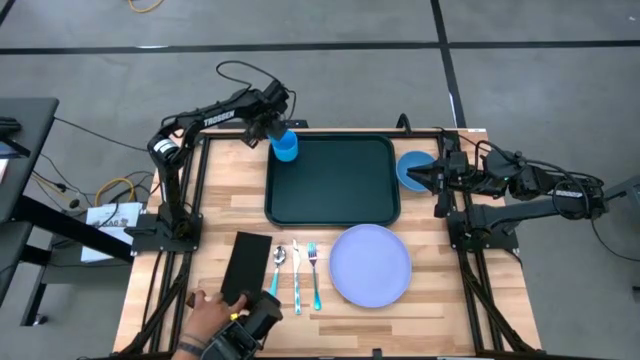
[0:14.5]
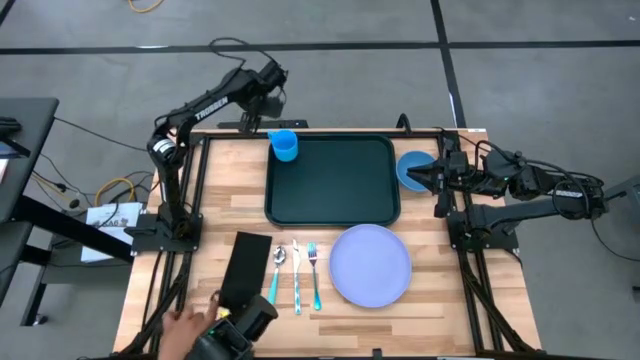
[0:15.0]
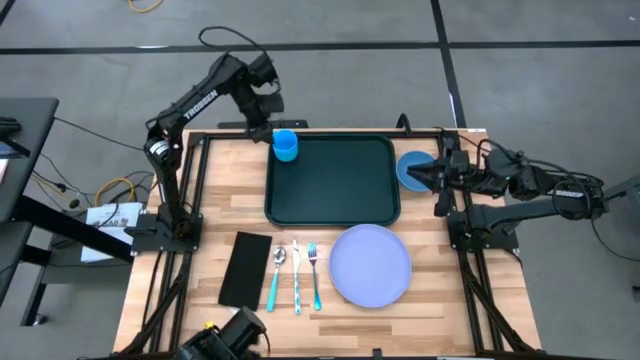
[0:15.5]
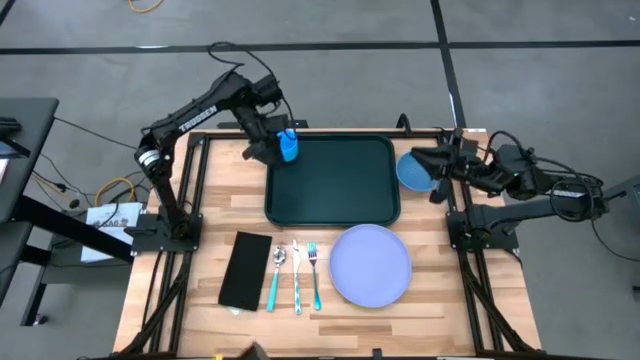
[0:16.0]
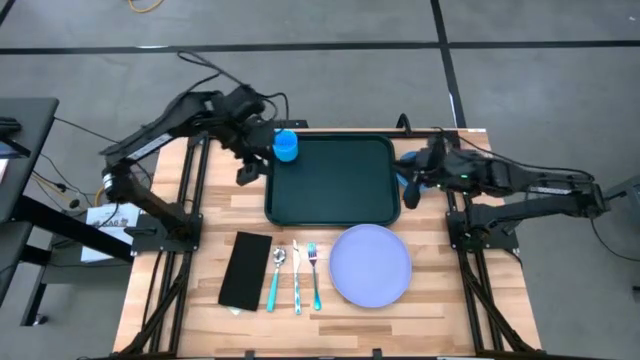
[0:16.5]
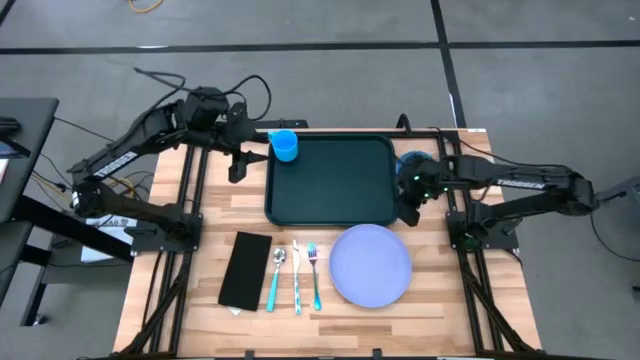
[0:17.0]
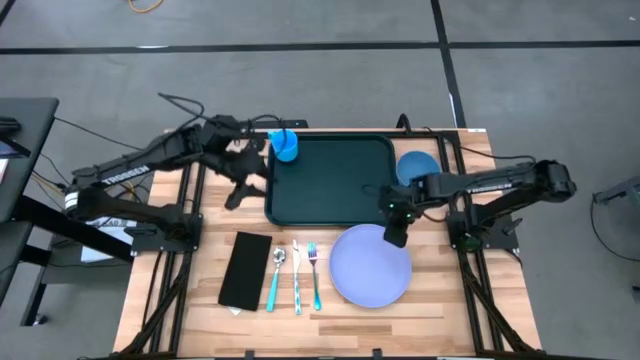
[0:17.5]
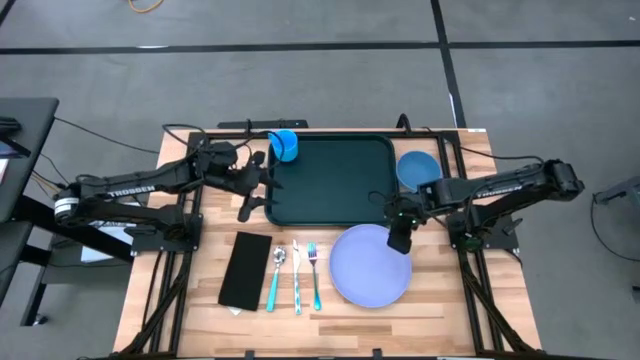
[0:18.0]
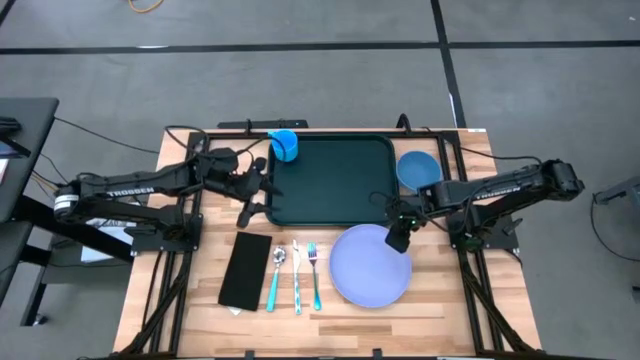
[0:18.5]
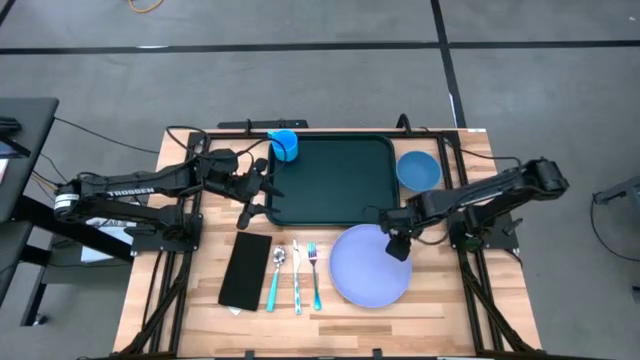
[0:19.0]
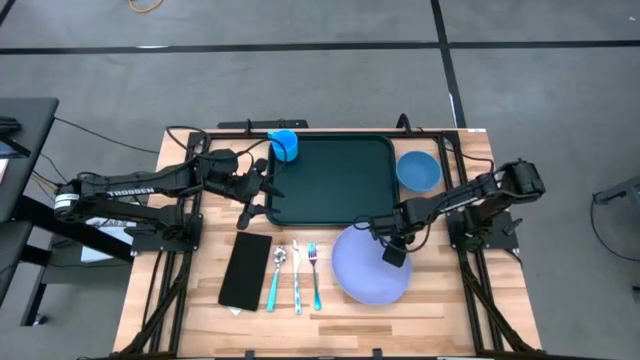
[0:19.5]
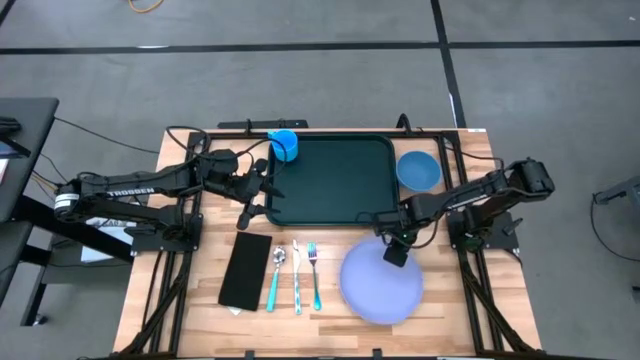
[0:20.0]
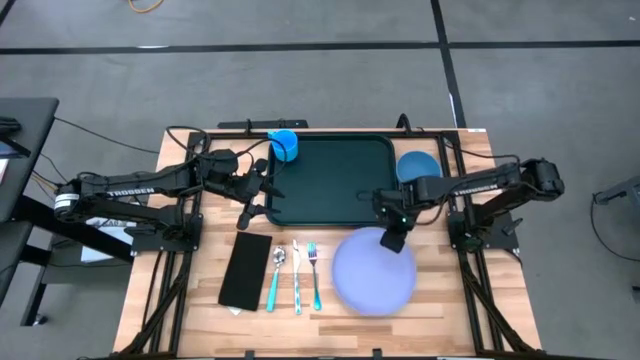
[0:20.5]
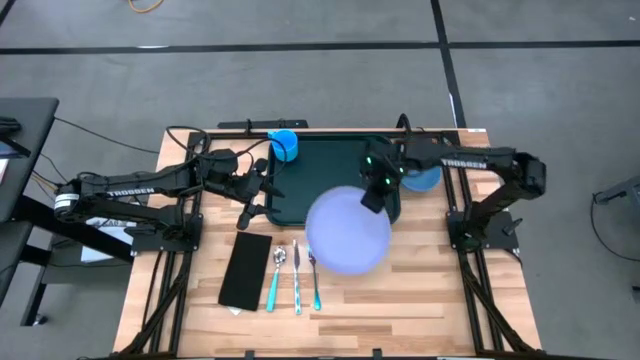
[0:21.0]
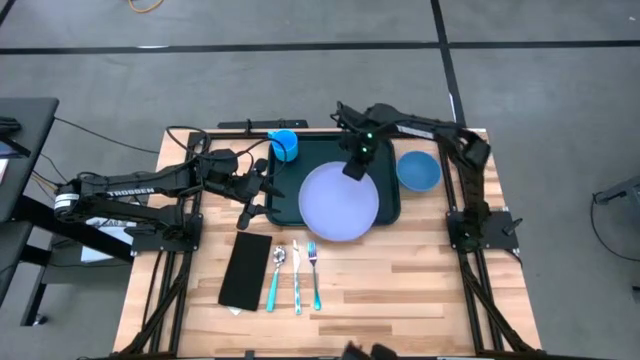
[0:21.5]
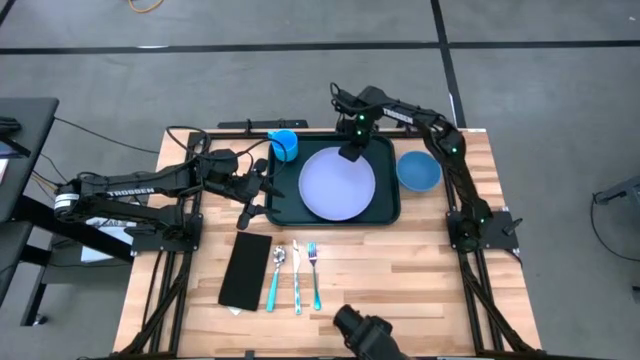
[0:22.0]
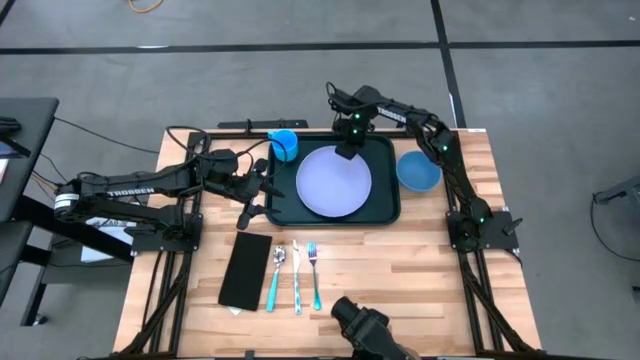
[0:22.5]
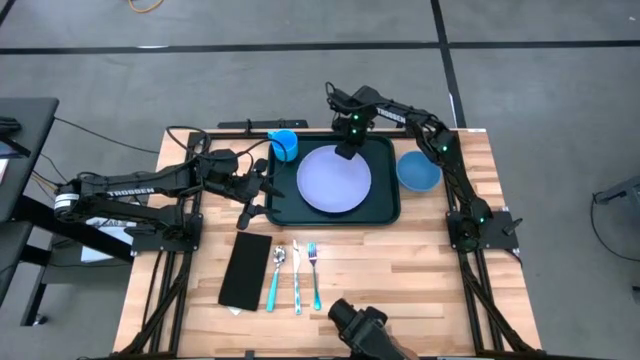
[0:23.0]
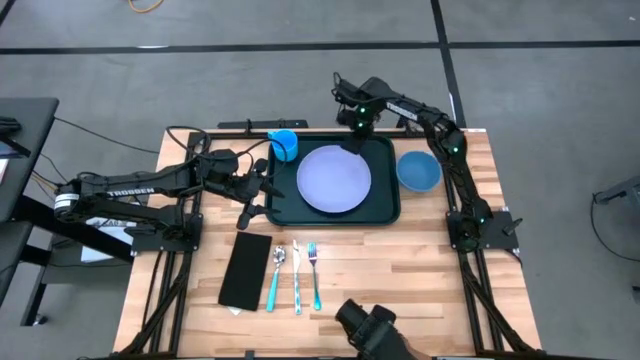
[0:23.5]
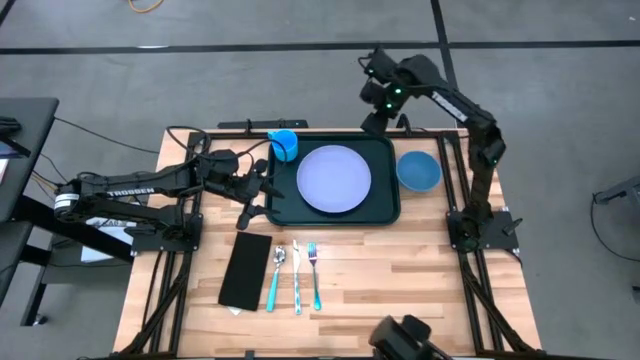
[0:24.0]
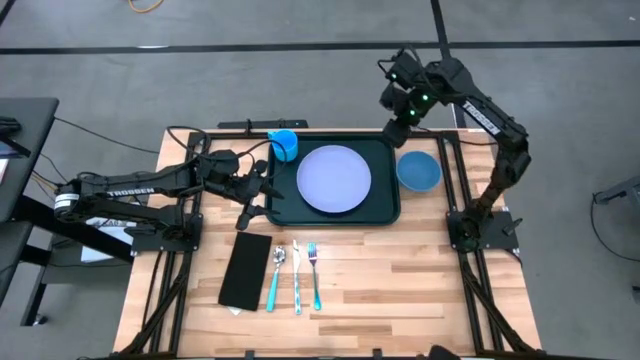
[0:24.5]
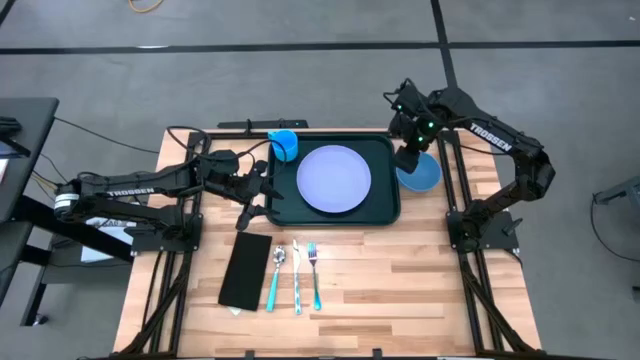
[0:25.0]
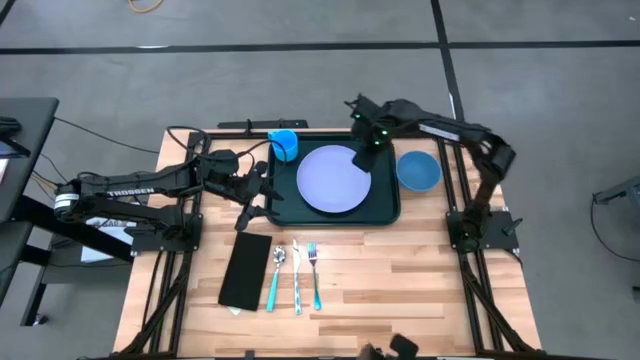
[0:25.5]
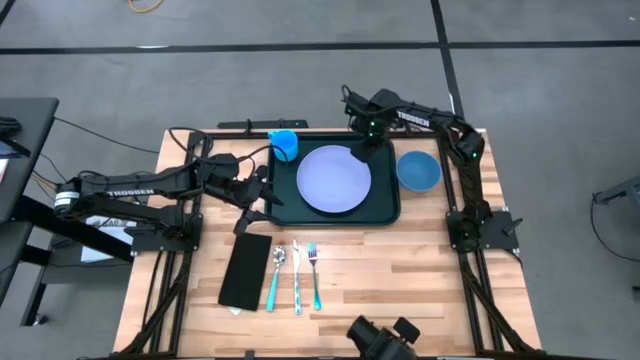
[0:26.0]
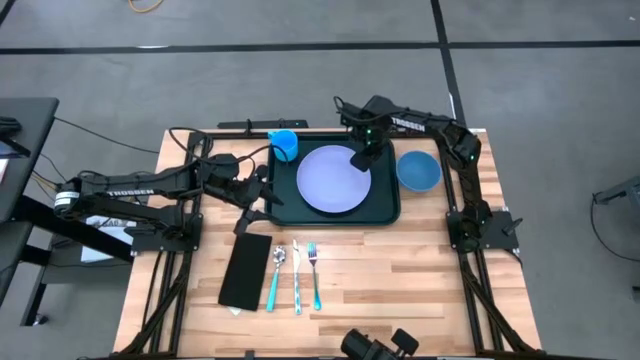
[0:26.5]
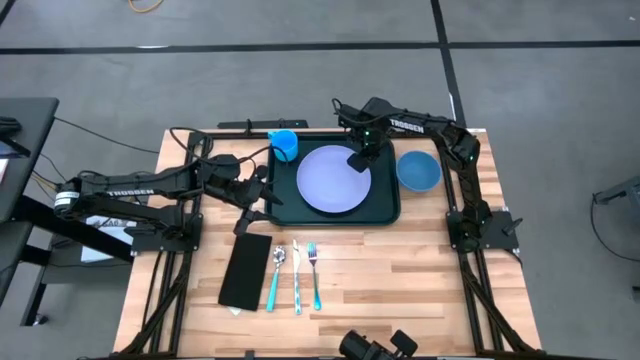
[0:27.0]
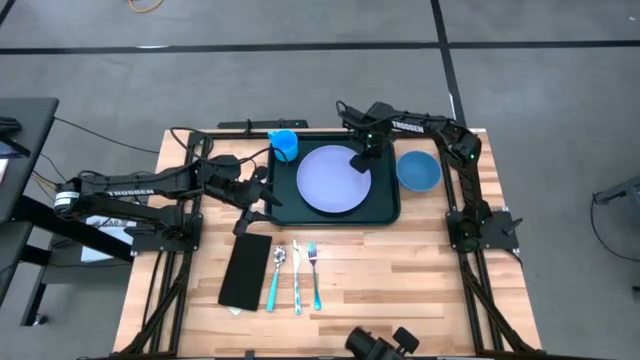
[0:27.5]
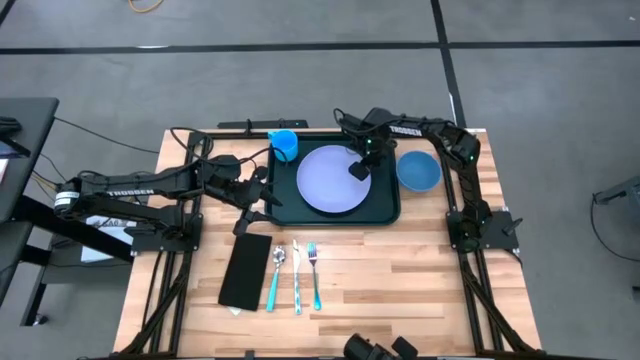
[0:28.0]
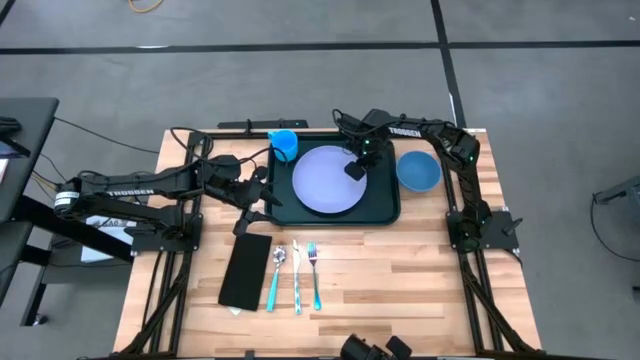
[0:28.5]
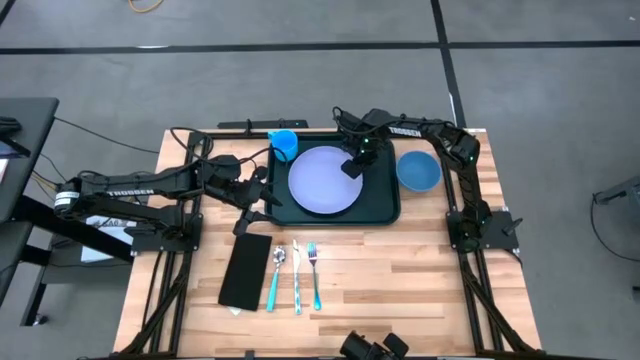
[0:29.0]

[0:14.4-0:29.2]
Task: Set up tray
Put the purple plate on the tray

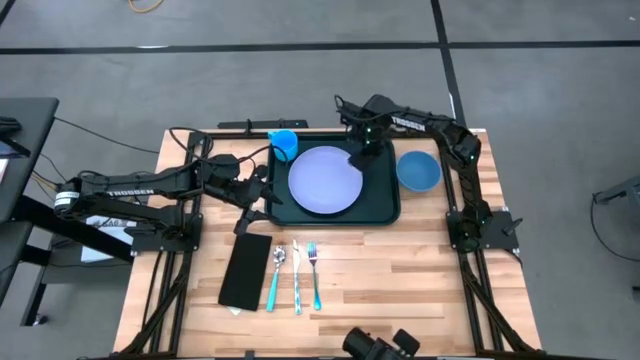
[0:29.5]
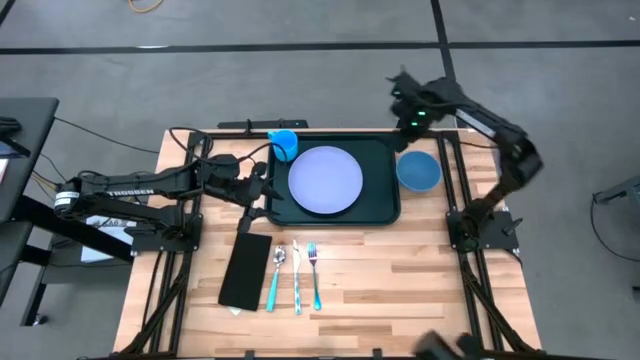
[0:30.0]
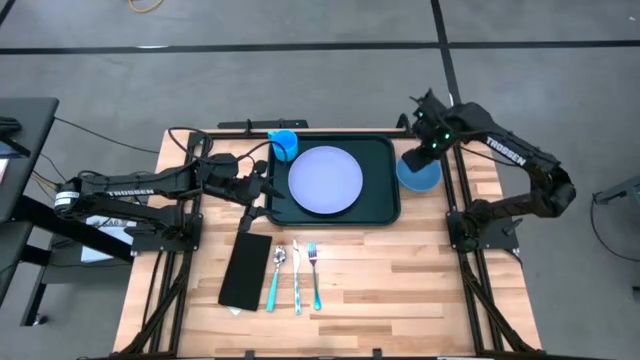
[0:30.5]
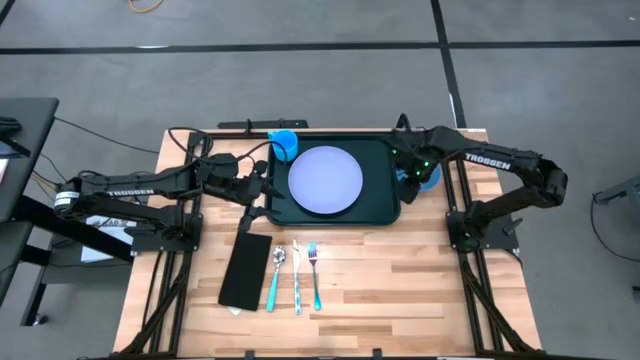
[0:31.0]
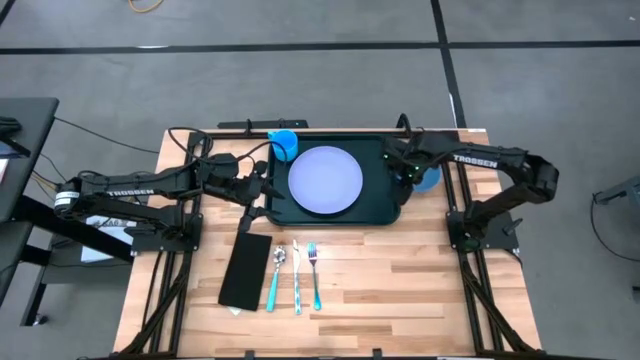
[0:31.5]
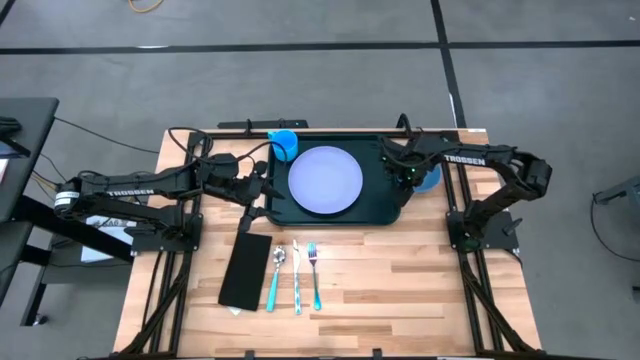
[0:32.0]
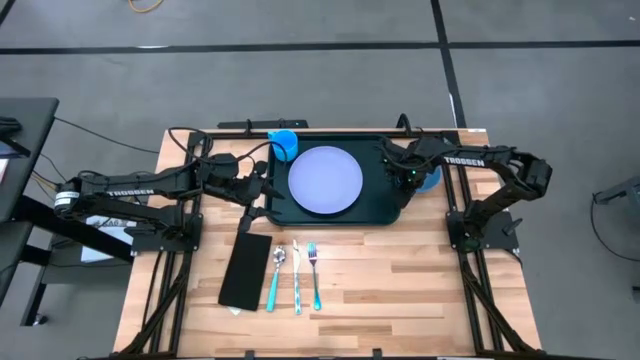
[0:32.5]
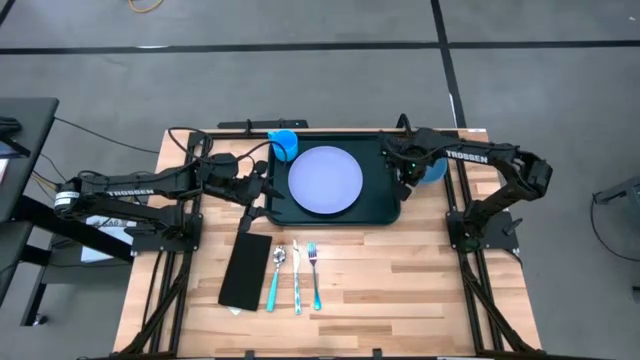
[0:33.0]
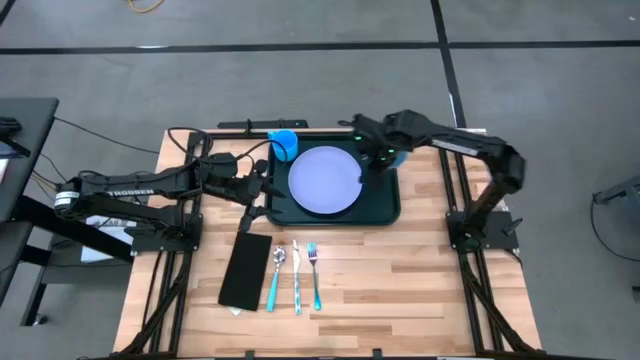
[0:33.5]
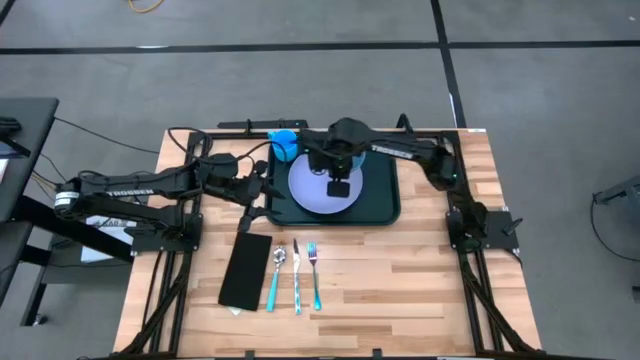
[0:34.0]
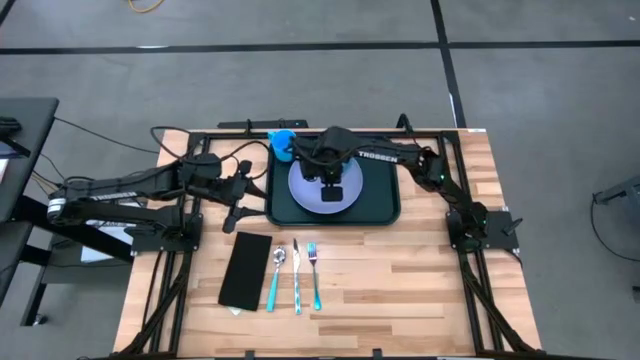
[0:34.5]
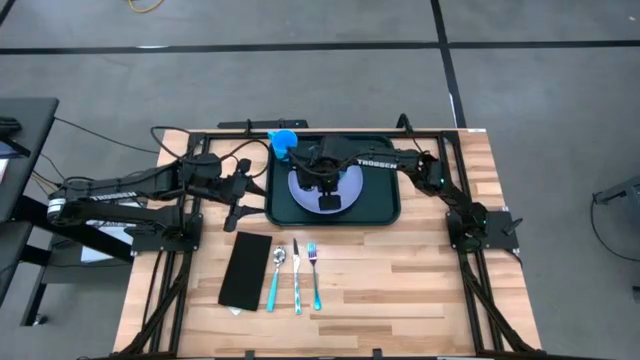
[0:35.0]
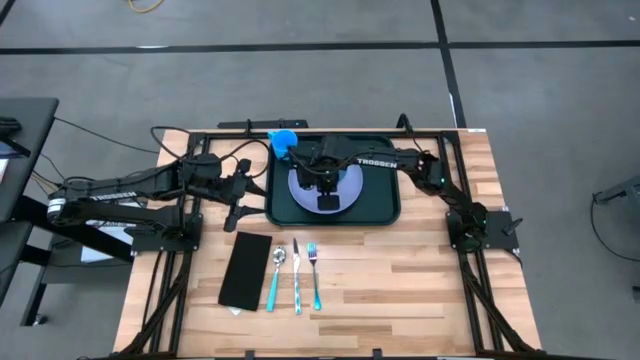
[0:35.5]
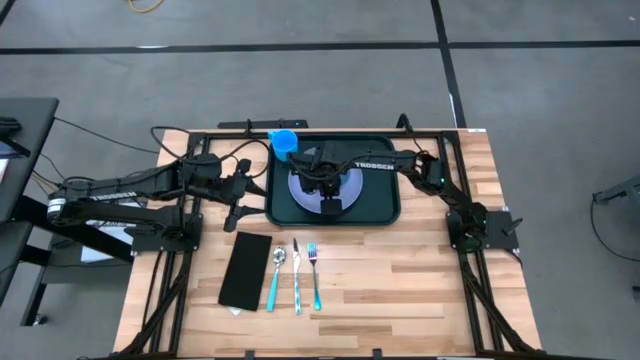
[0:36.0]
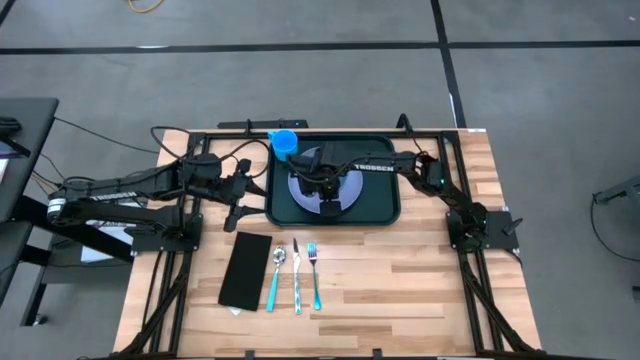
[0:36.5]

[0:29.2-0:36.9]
Put the bowl on top of the purple plate
